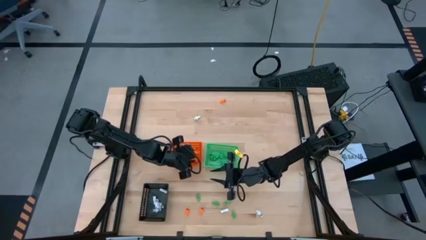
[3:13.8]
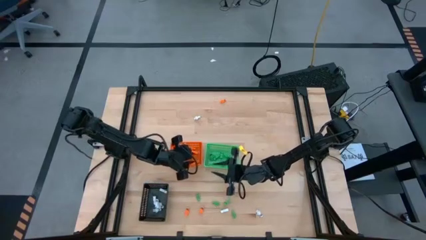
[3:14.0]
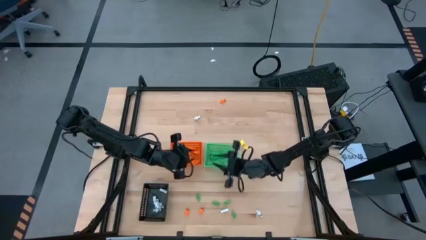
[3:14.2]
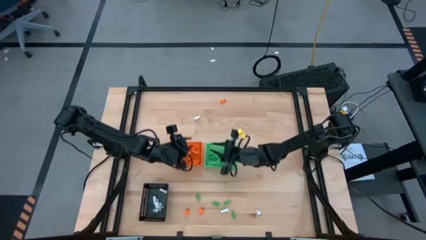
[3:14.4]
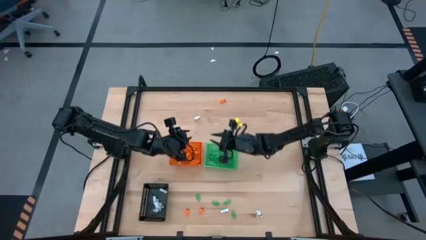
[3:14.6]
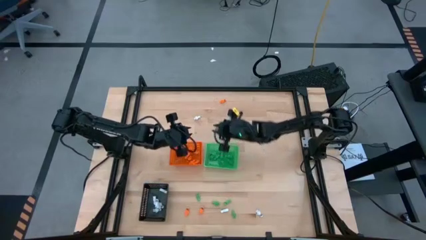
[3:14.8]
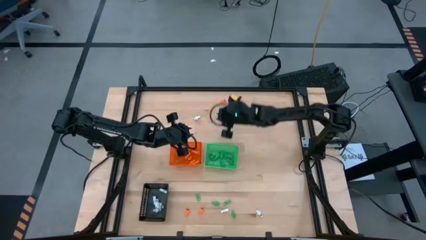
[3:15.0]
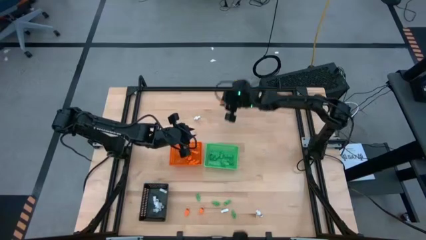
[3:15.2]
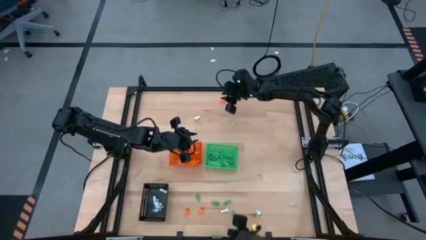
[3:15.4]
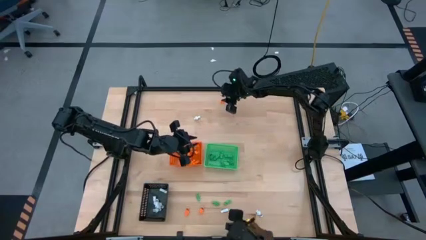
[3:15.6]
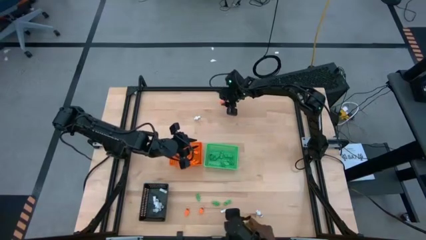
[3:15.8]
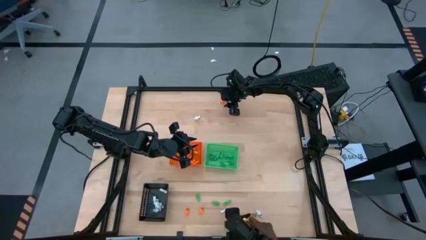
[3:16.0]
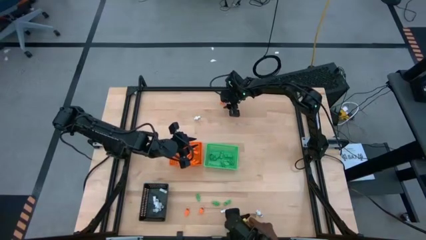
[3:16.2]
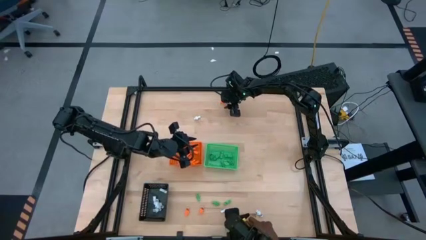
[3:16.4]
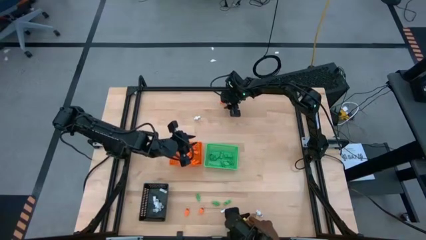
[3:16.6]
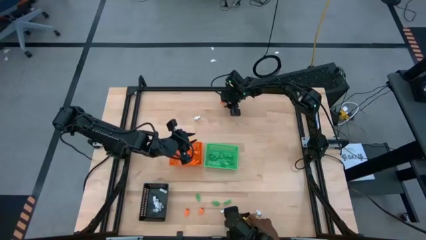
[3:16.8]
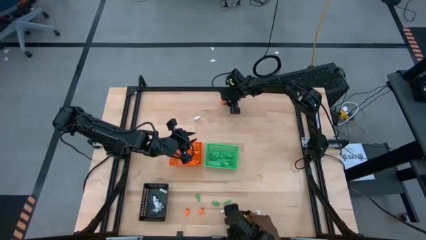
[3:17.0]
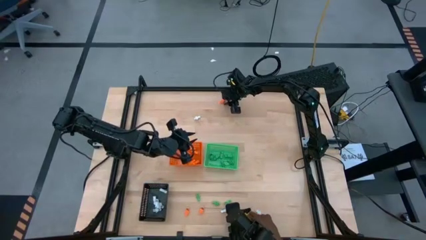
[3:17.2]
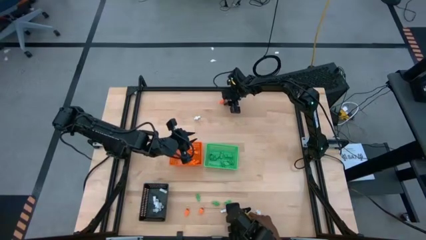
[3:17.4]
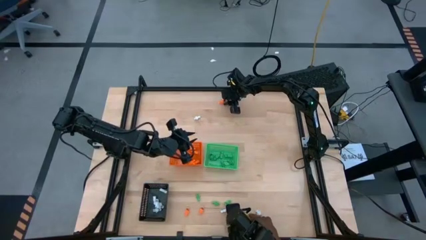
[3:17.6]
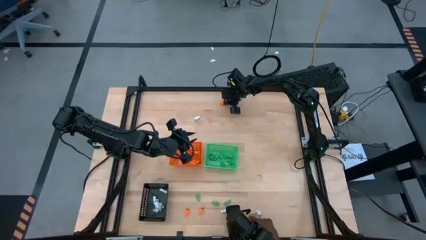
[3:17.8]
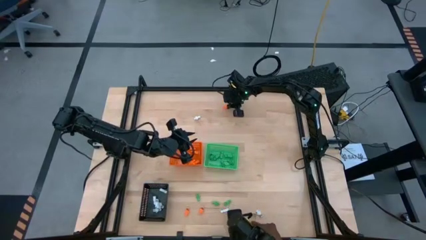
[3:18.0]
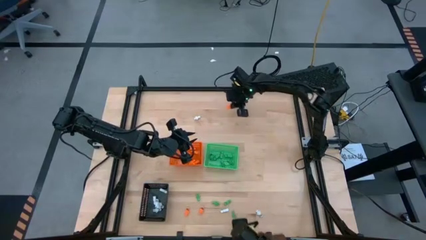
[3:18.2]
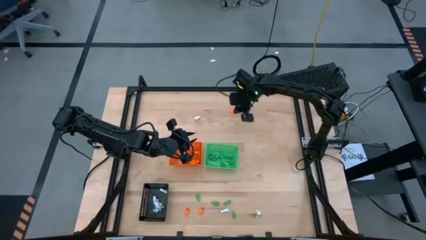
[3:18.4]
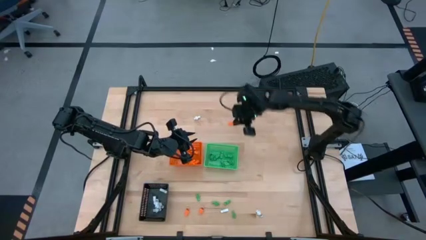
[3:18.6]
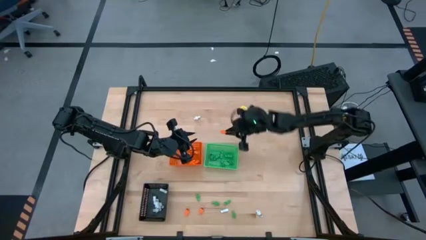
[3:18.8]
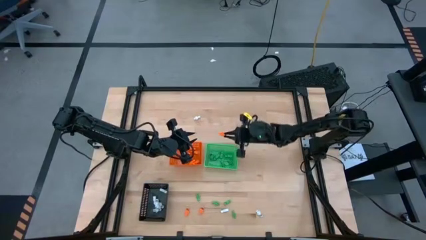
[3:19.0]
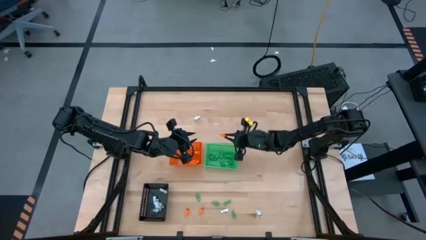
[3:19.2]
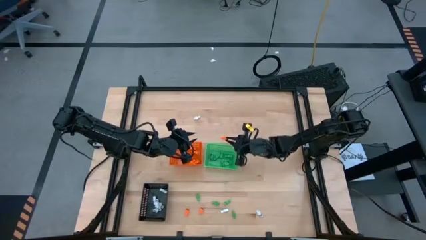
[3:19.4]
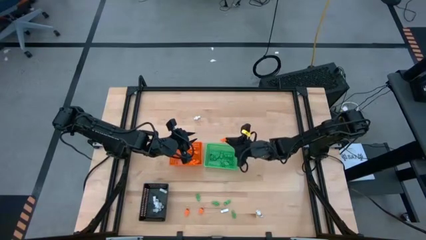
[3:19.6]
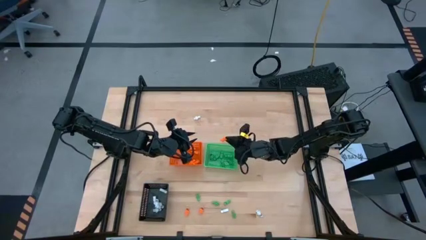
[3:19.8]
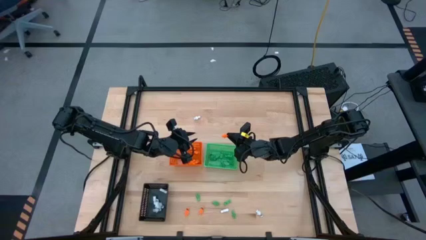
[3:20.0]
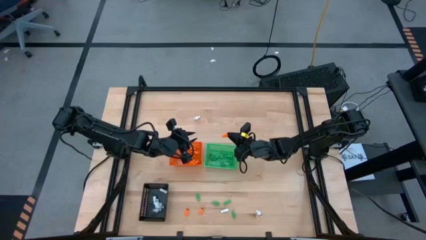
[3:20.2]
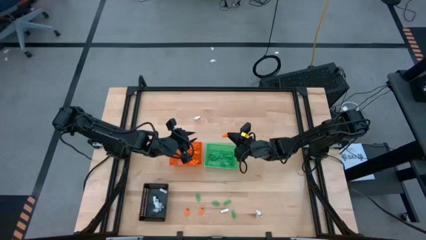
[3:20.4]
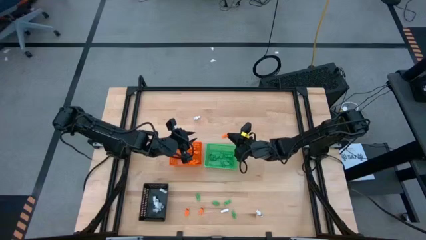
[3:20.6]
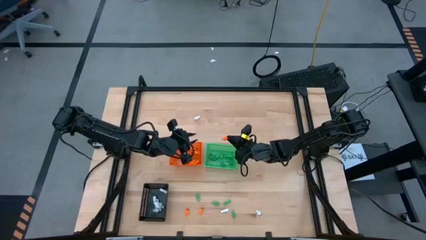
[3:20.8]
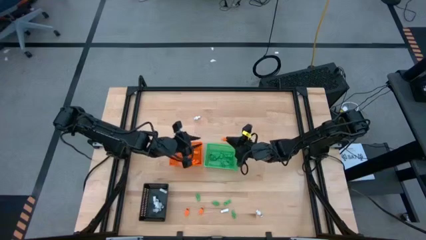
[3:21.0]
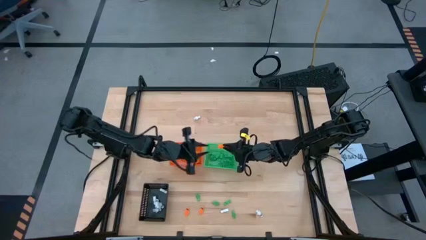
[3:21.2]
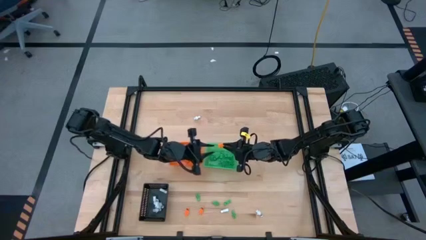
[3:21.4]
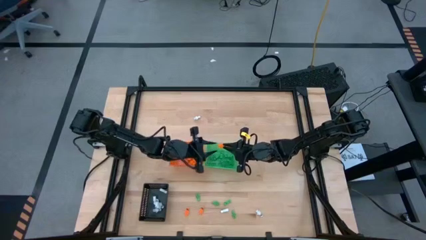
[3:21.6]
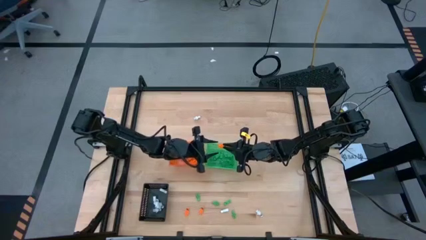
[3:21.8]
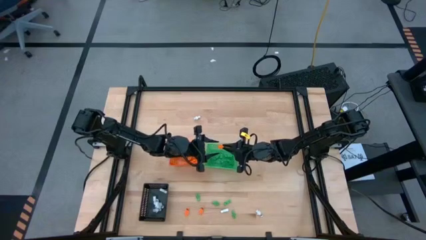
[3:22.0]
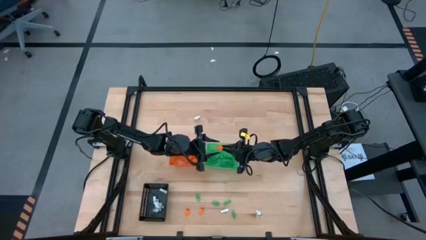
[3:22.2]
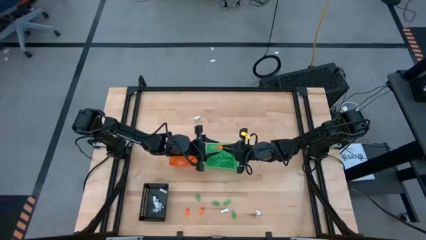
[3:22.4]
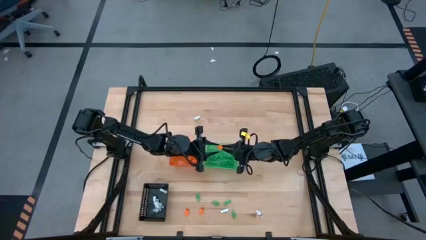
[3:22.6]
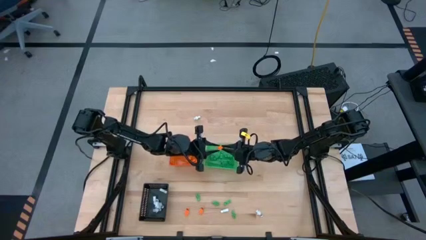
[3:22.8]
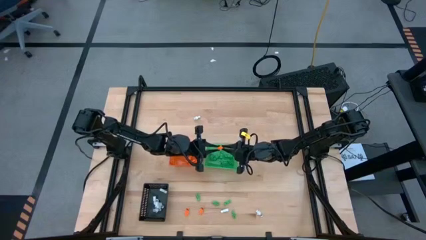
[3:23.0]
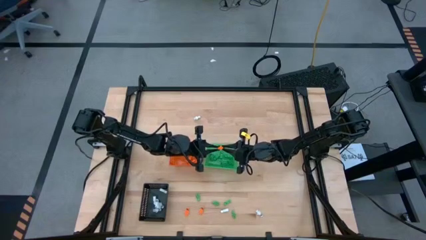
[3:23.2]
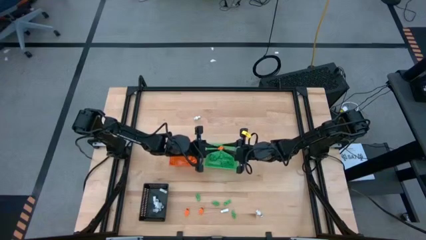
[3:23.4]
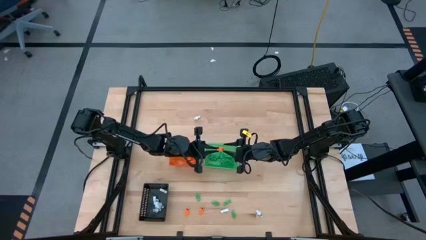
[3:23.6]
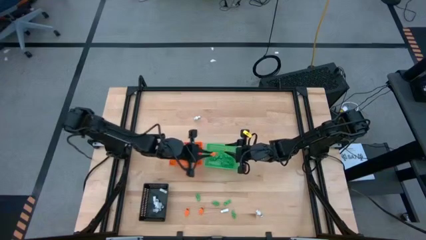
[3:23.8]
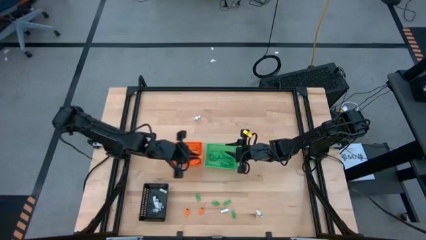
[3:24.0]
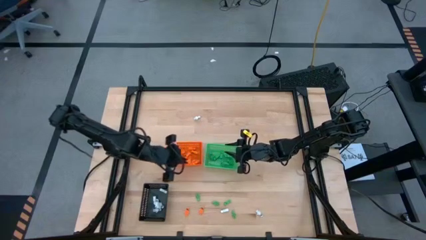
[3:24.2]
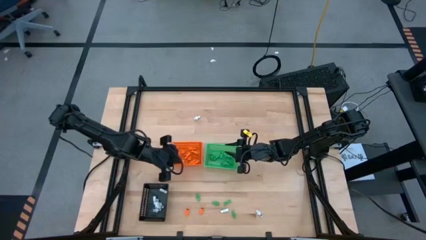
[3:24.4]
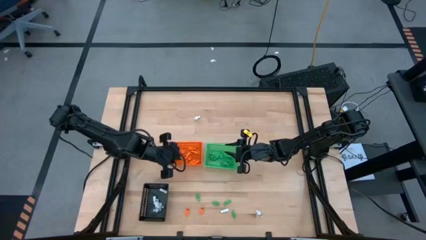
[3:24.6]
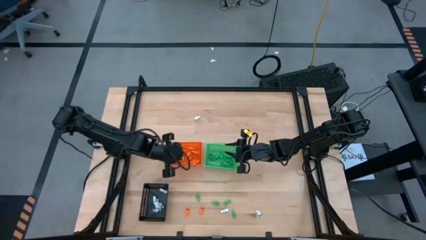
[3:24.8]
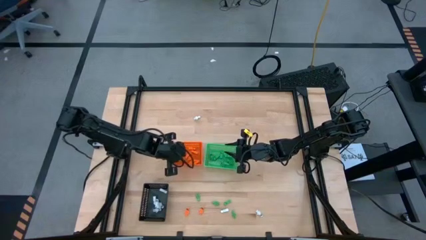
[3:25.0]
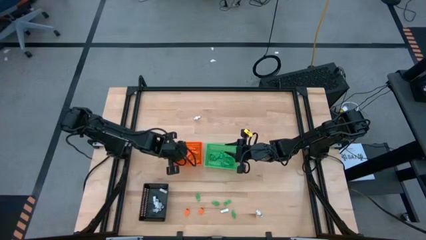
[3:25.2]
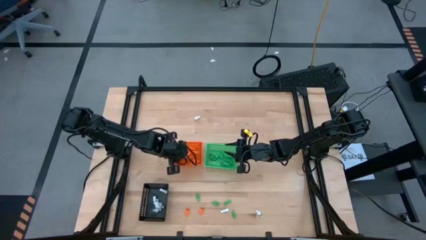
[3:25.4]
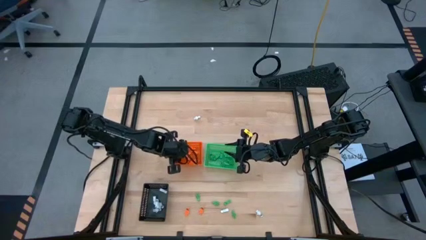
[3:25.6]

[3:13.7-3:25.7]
Task: Sort Halloween decoration
Put the orange skeleton toy into the orange bin

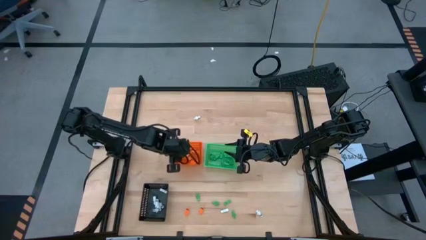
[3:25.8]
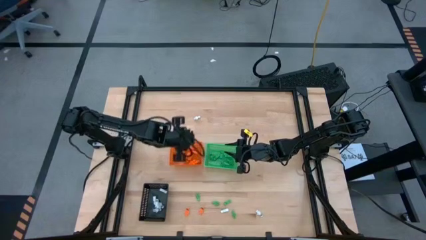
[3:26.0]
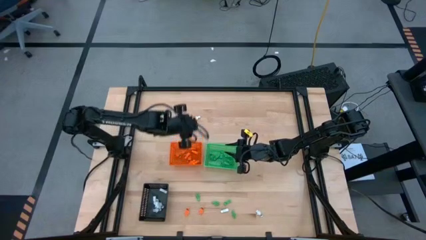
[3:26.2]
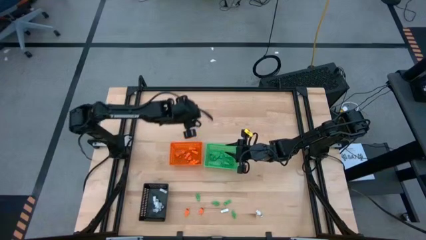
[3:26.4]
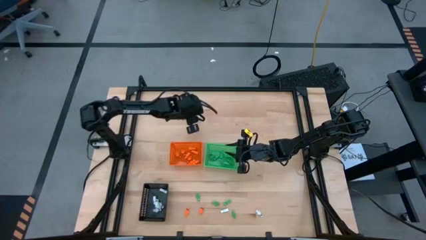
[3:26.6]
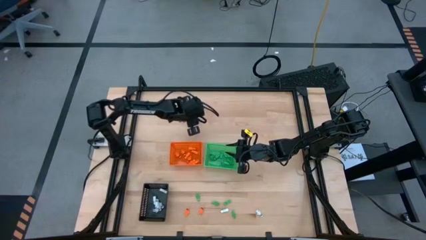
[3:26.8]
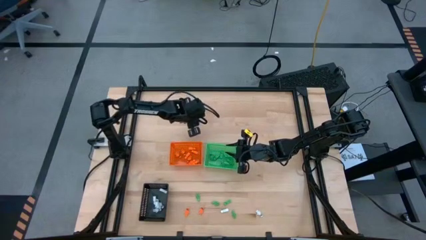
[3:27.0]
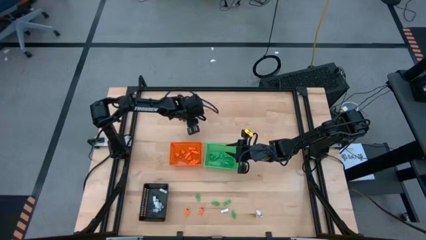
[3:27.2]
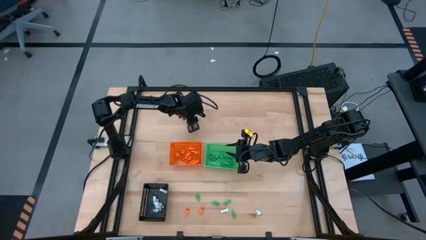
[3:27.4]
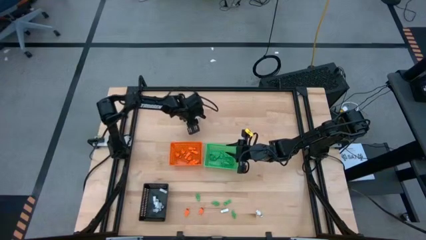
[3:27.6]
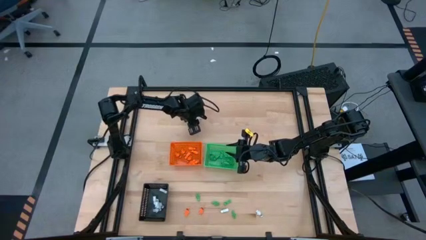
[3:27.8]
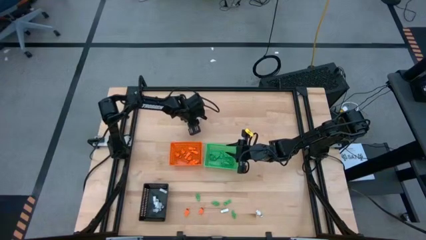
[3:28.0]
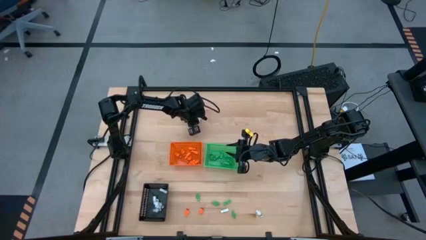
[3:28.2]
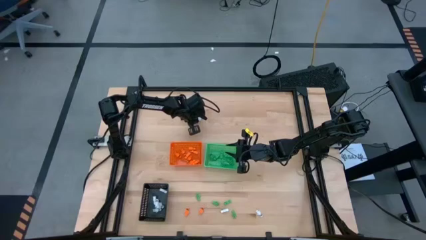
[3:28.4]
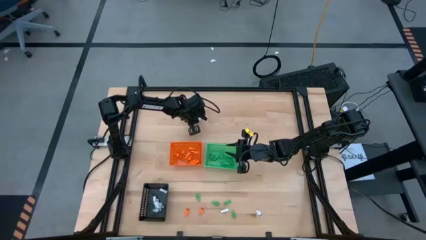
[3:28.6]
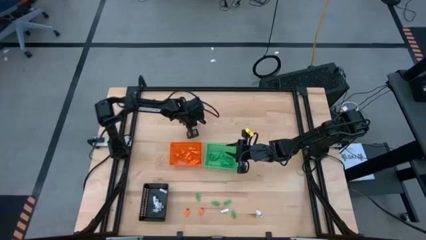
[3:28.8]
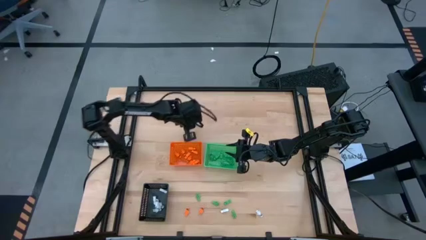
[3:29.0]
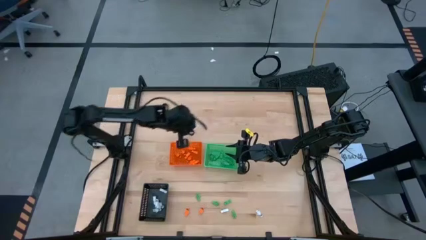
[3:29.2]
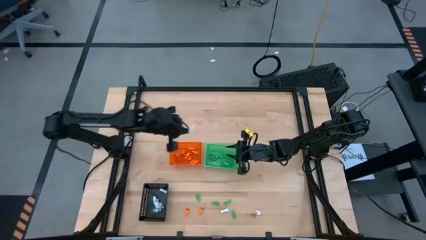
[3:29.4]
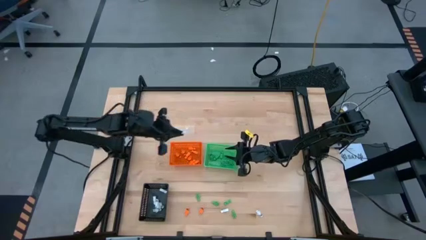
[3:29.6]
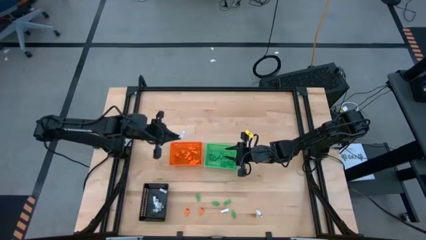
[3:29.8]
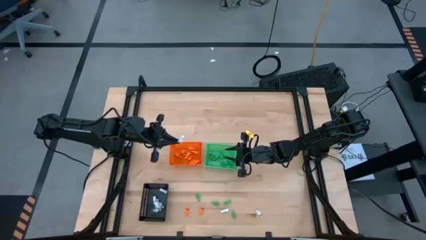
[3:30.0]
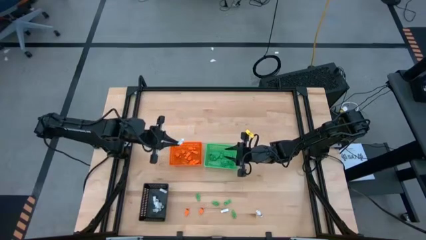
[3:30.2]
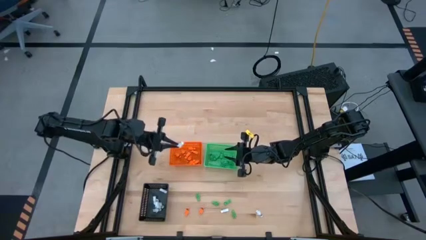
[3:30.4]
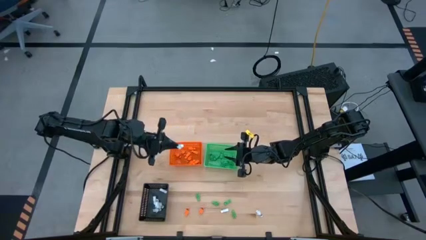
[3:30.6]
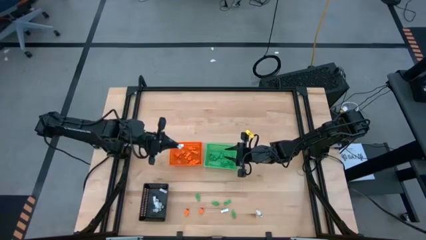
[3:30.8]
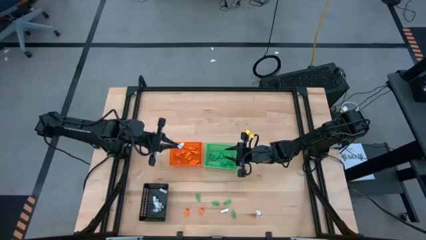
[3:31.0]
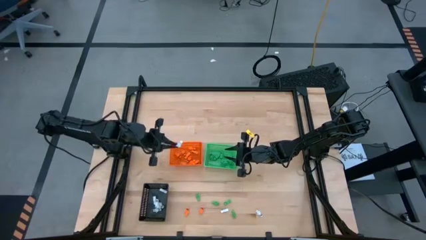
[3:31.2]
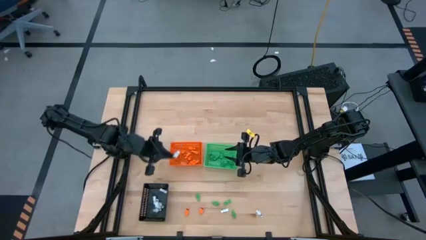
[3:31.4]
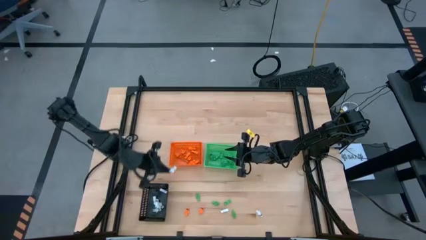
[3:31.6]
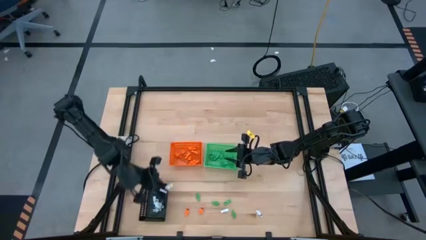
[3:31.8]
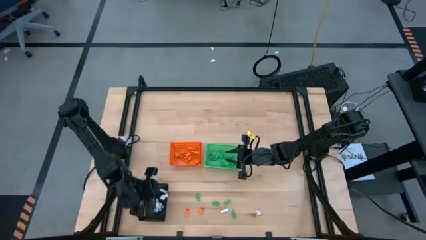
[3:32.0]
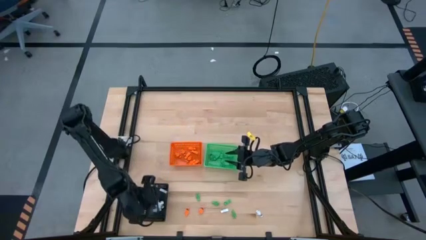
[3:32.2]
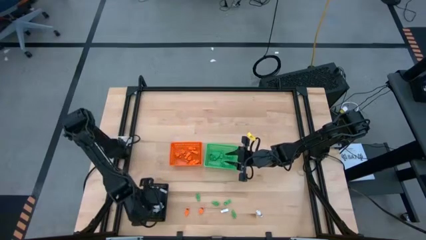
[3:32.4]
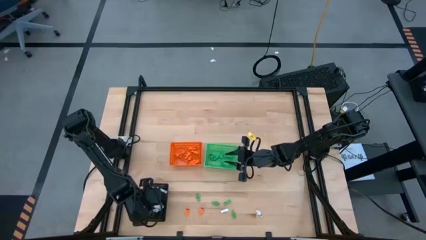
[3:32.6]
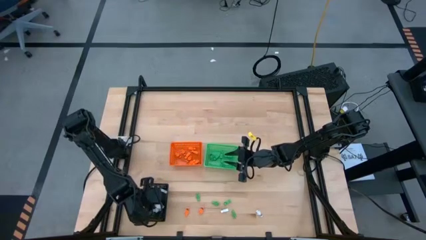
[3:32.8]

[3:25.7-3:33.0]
Put the white skeleton toy into the black bin
